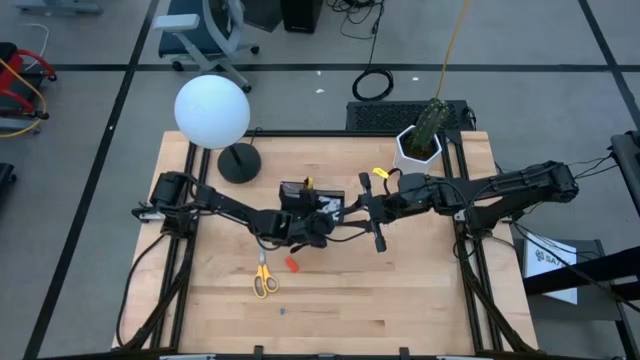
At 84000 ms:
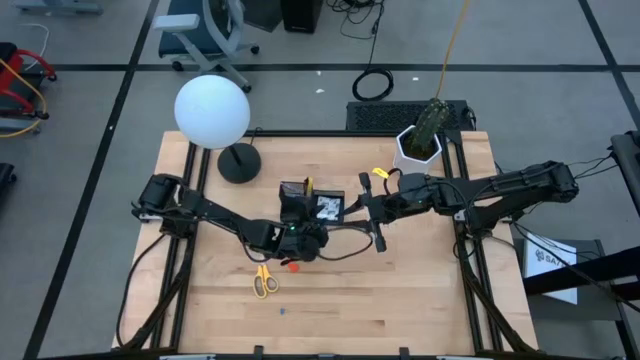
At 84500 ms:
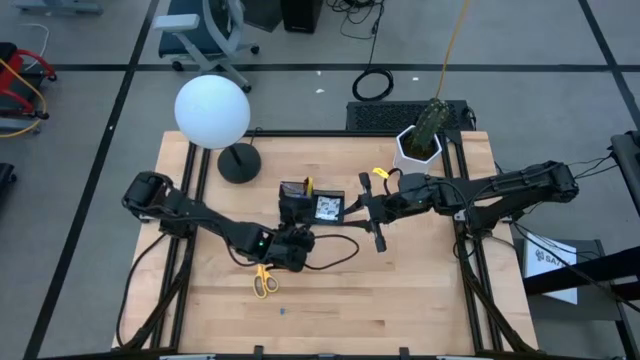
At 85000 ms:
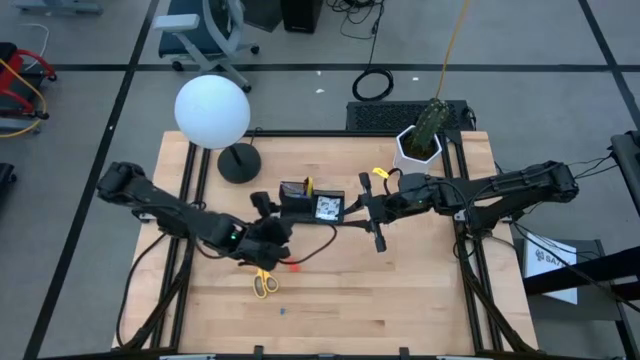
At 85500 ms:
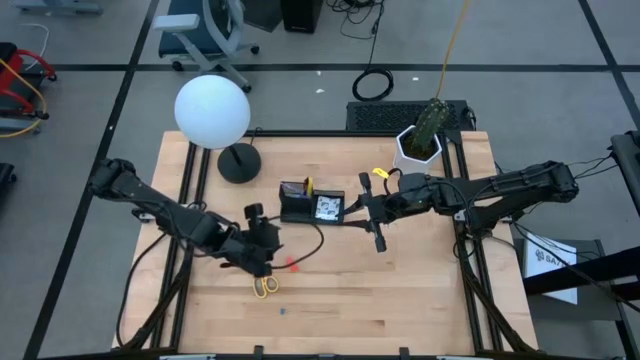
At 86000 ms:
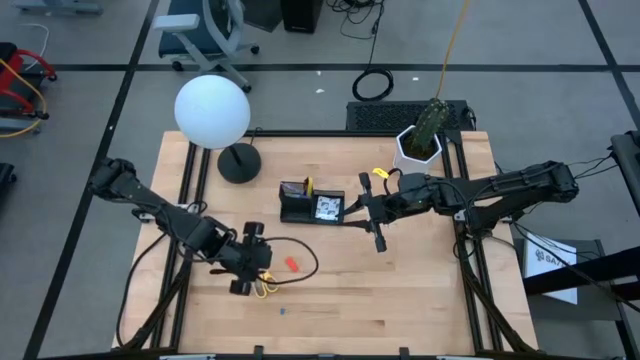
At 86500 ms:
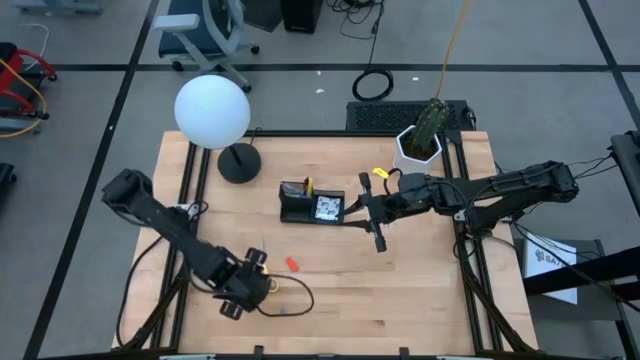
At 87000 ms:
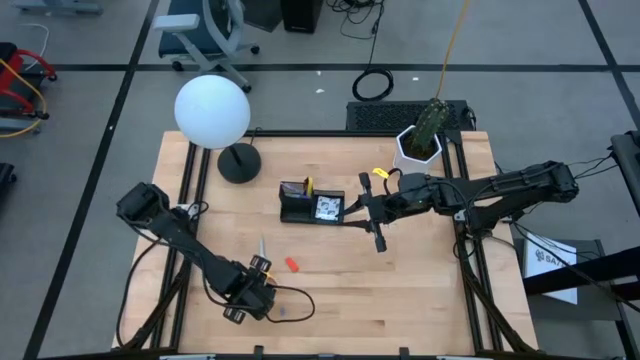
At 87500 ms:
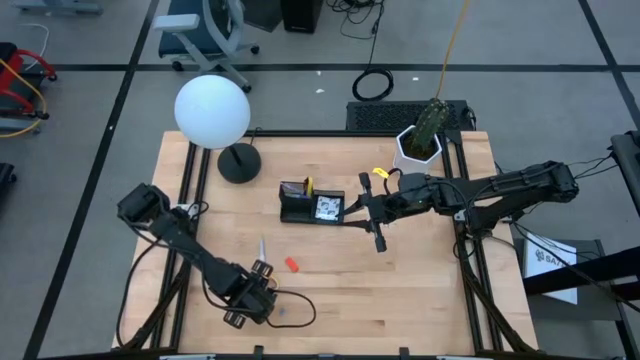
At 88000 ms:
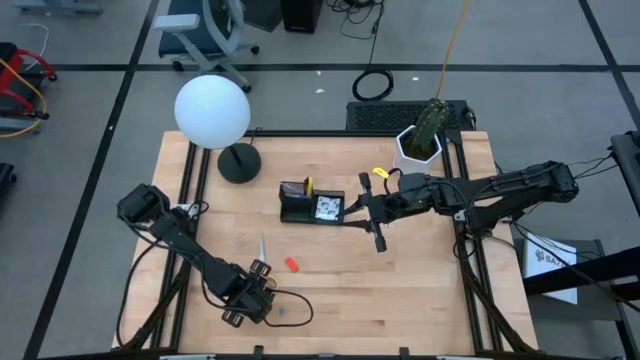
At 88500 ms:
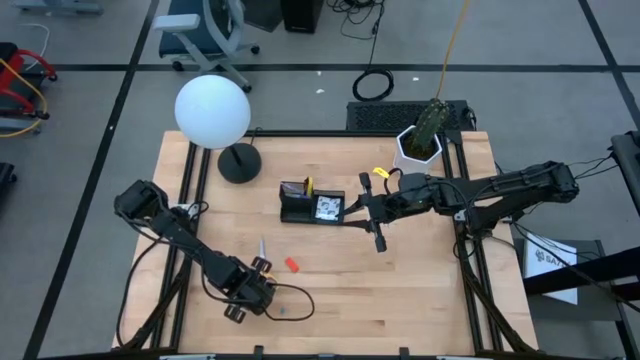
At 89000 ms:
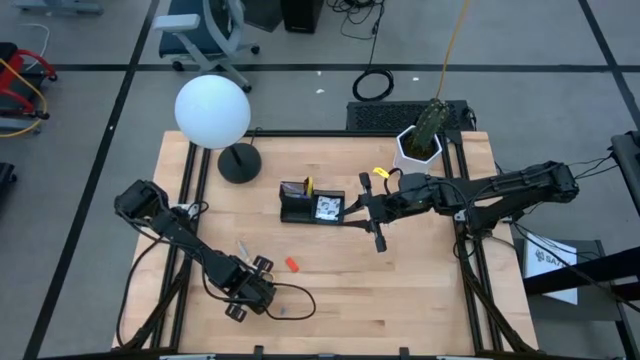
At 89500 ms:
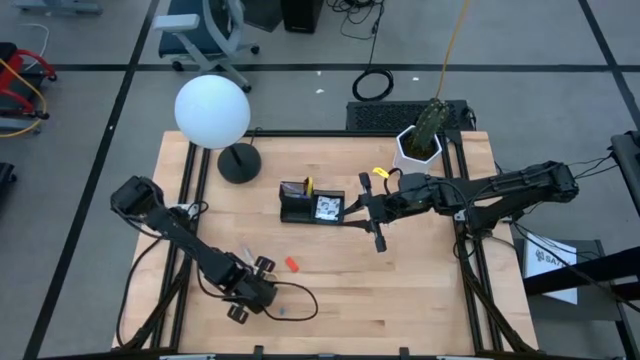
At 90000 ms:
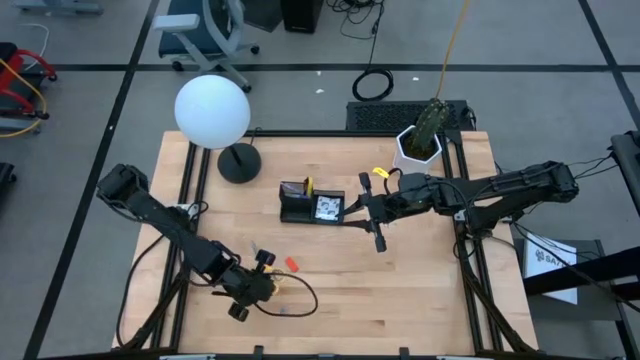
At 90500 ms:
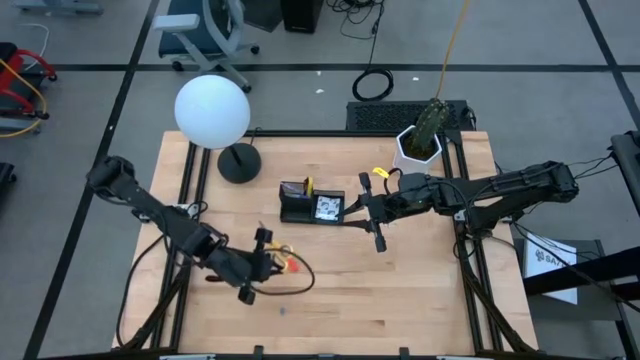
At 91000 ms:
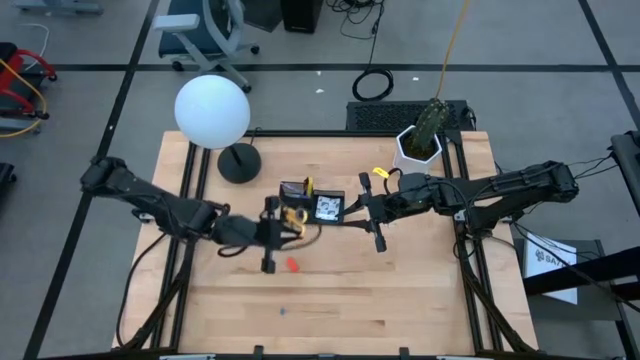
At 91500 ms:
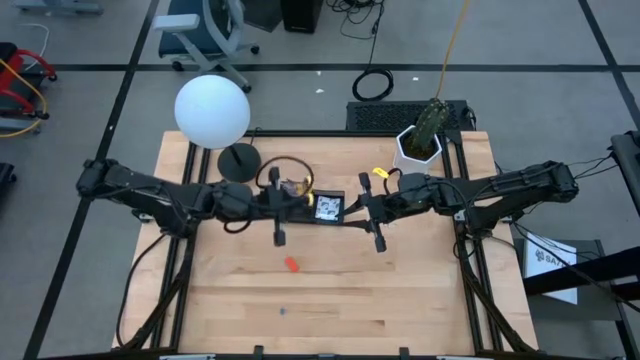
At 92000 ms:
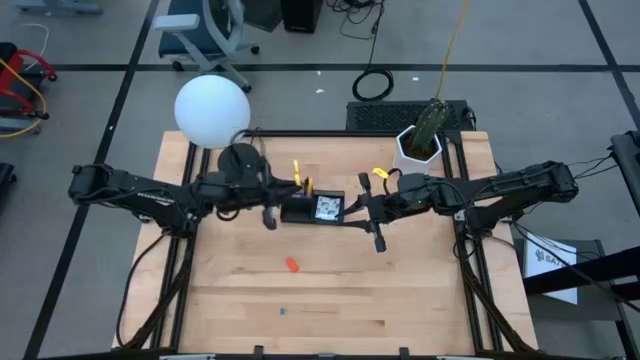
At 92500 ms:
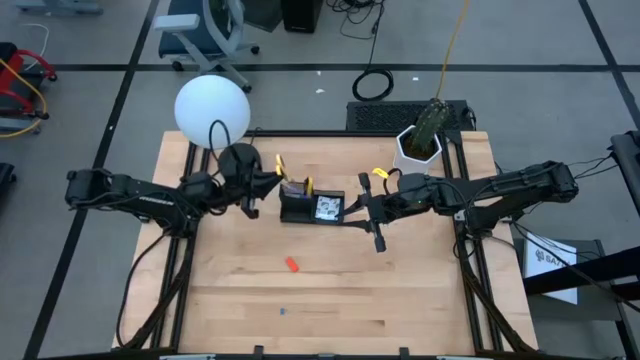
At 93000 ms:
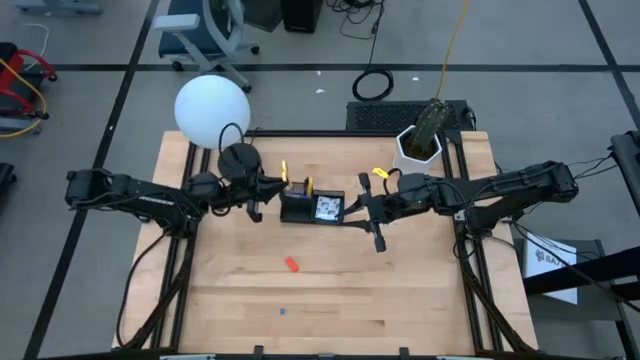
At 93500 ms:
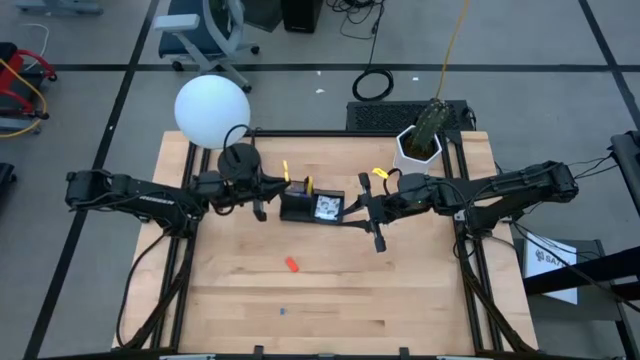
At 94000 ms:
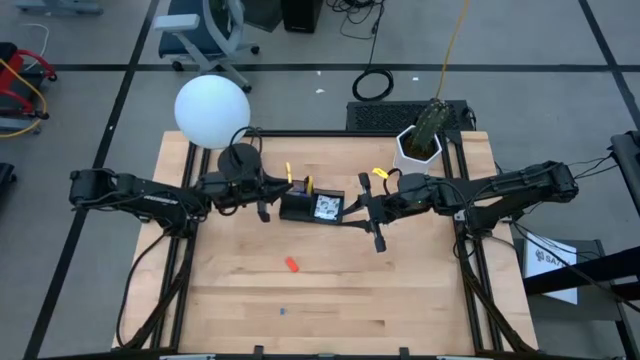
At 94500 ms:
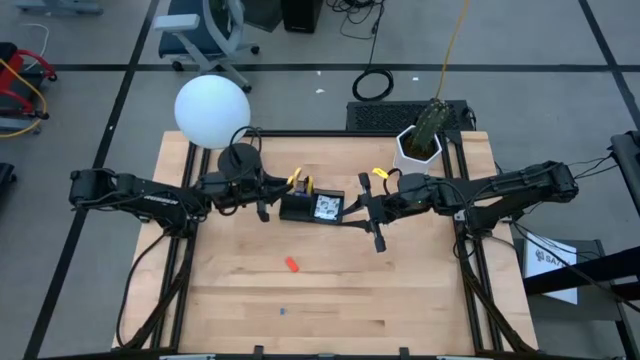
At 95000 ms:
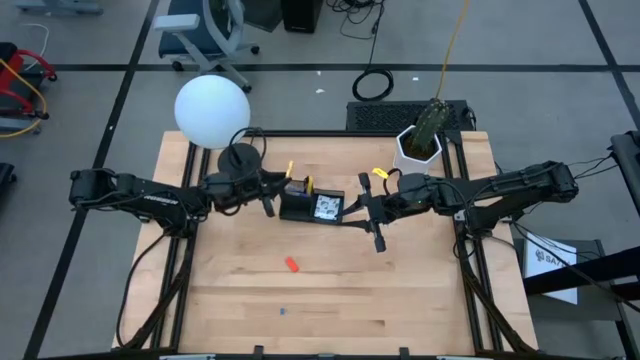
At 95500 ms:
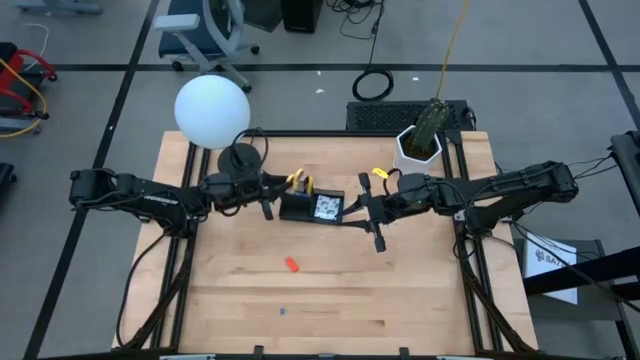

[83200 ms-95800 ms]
Task: Pick and place office supplies into organizer
Put the yellow scissors into the desk organizer

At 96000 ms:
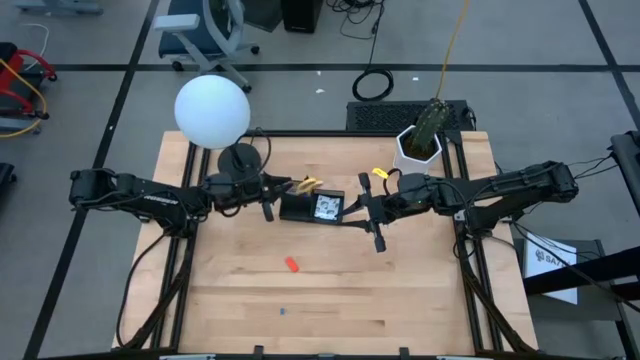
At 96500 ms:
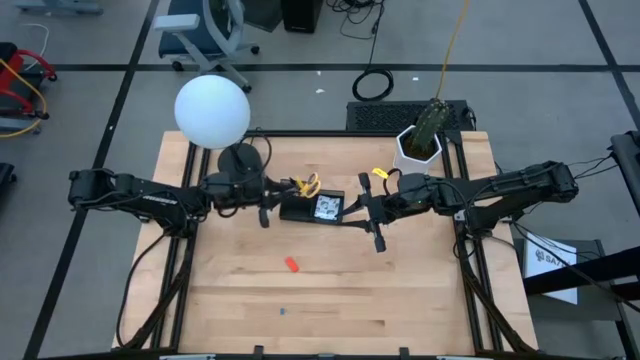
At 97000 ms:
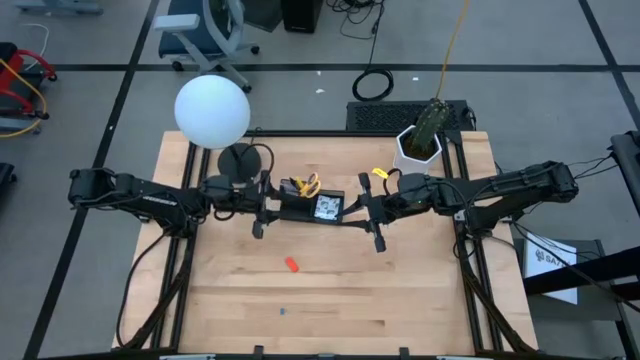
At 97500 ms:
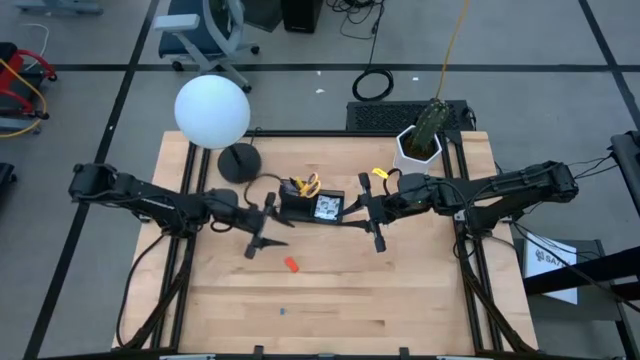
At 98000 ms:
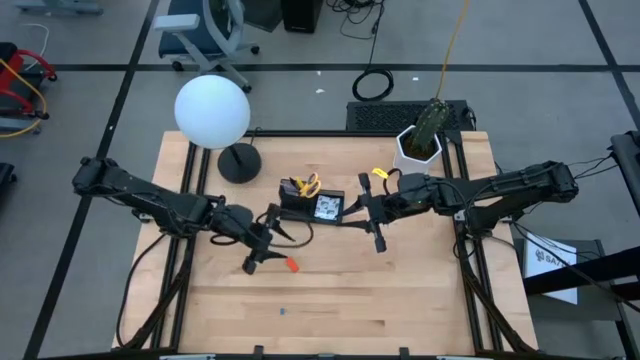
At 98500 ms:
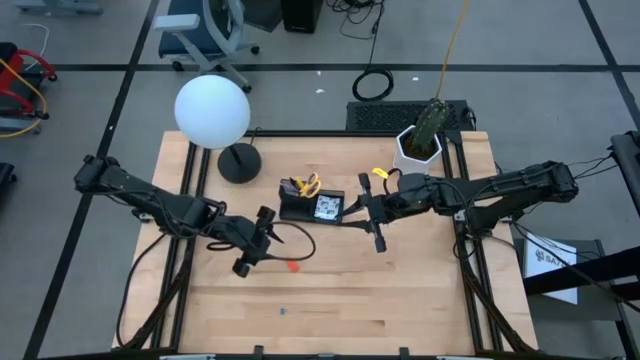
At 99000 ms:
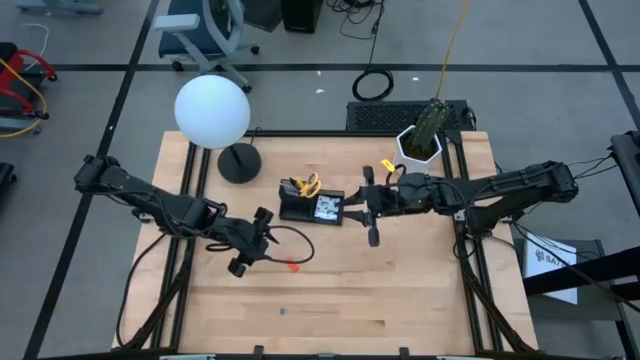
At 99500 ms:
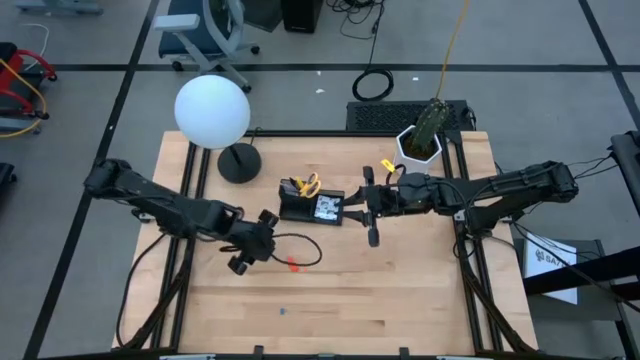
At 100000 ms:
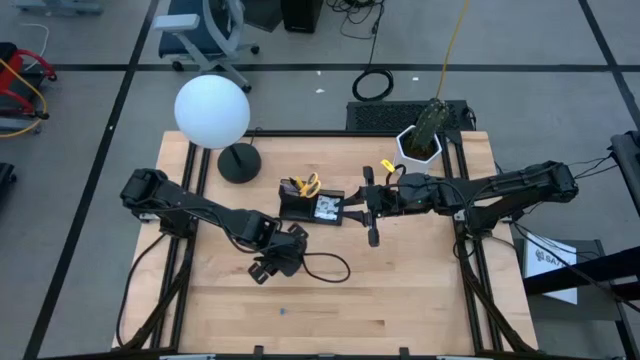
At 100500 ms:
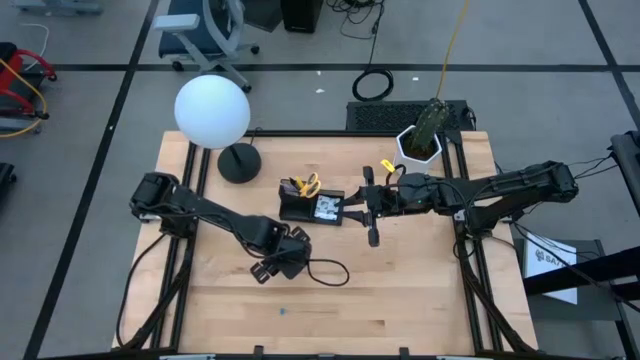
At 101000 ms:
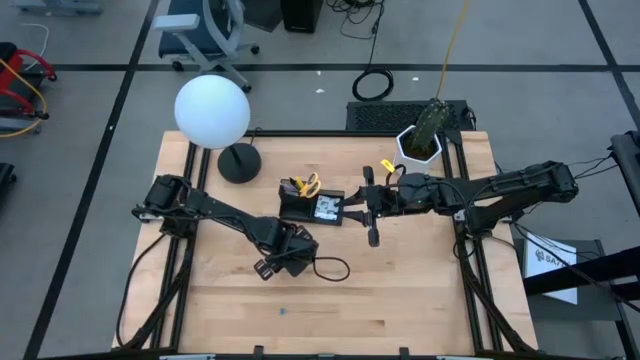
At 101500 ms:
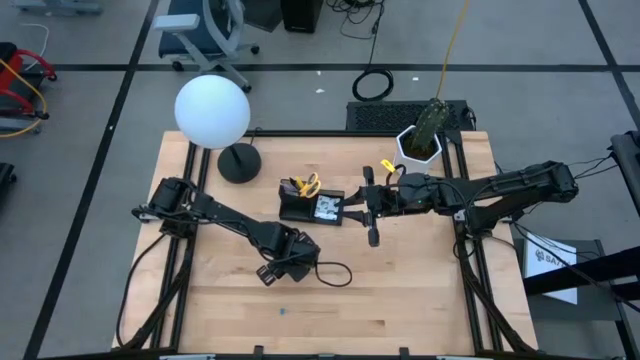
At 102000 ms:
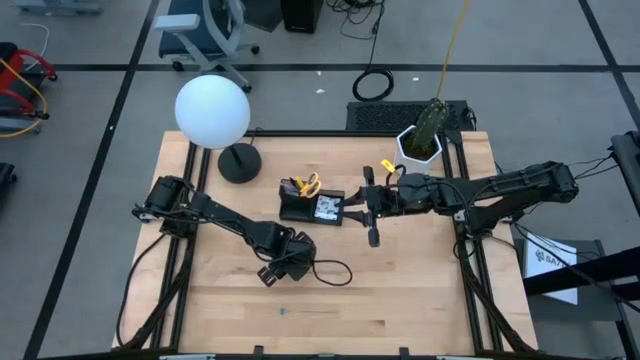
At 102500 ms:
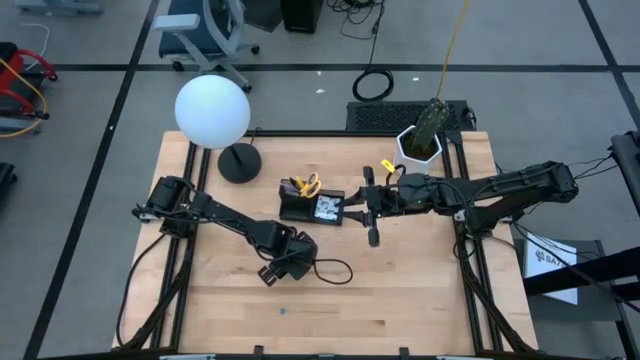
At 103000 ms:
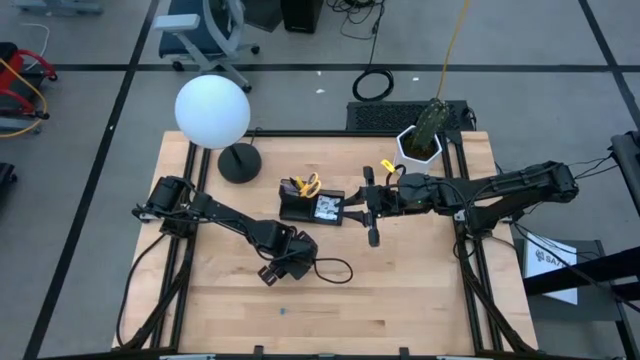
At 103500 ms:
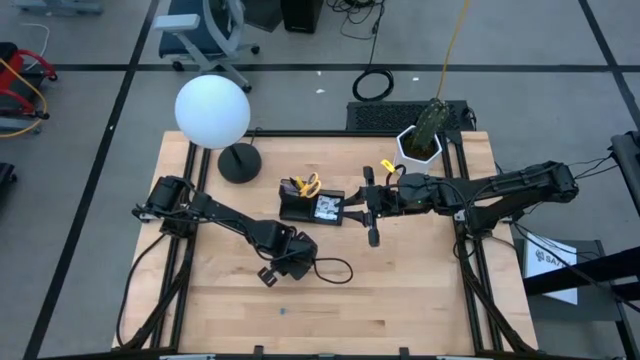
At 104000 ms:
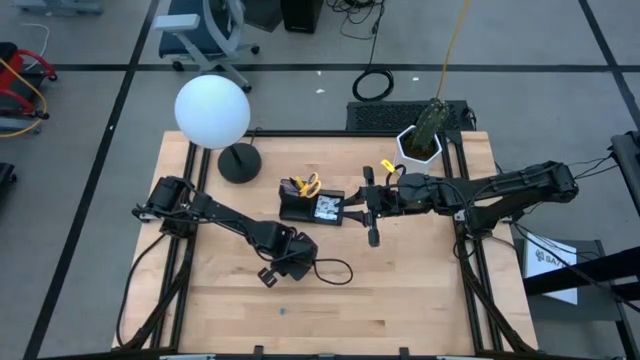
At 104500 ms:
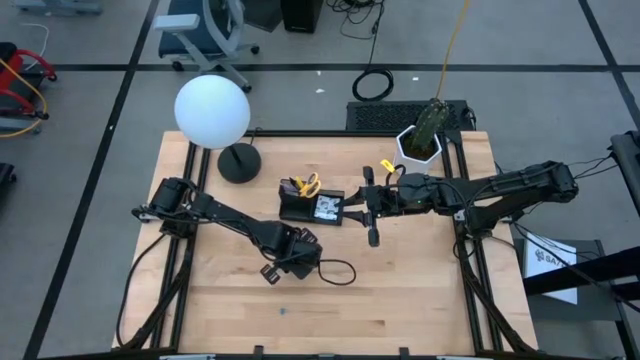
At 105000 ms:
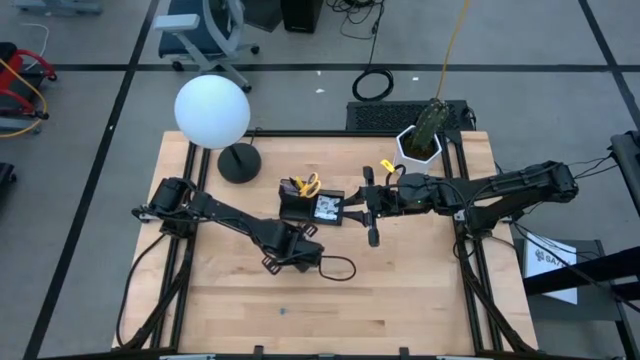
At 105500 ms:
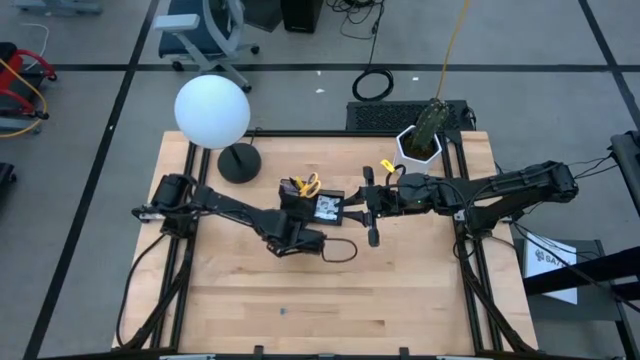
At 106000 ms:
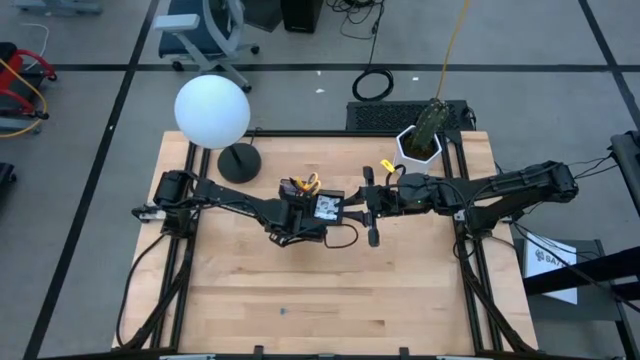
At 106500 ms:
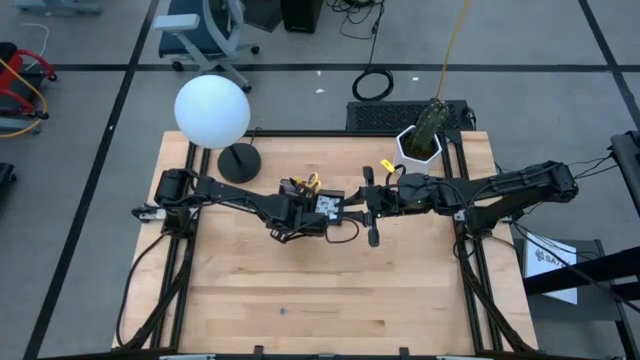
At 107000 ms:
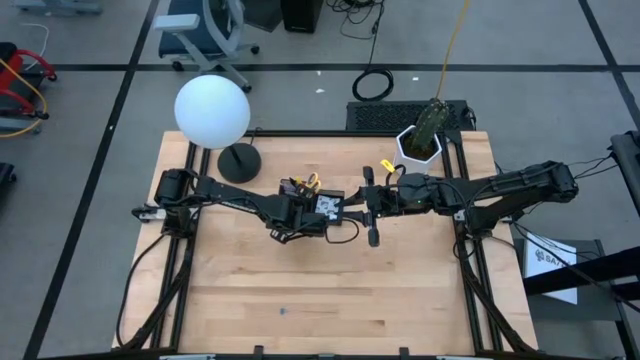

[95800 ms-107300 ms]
Put the orange eraser into the desk organizer
